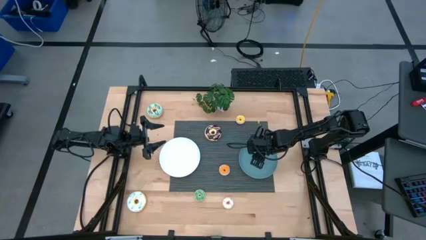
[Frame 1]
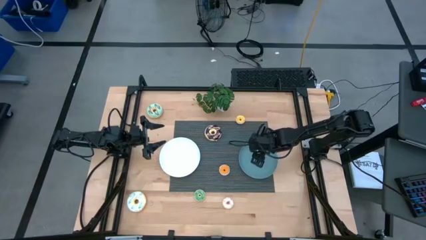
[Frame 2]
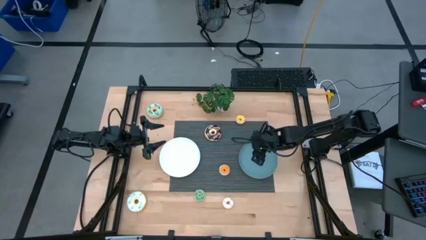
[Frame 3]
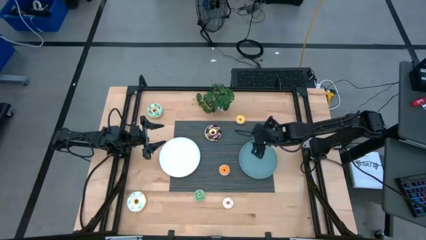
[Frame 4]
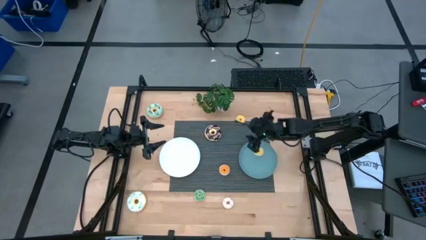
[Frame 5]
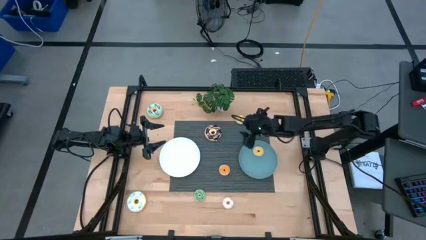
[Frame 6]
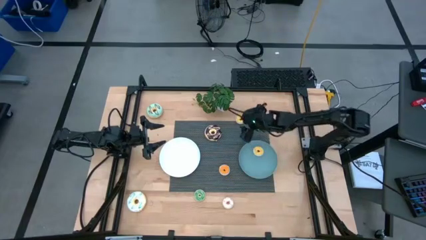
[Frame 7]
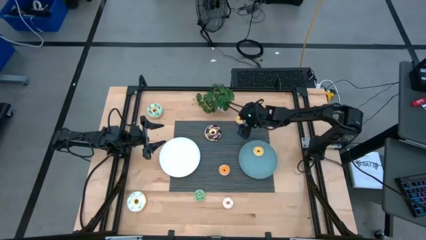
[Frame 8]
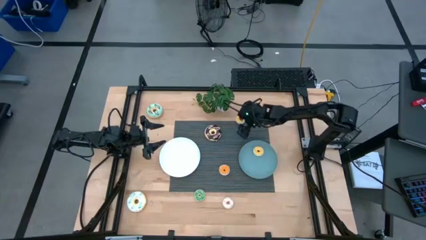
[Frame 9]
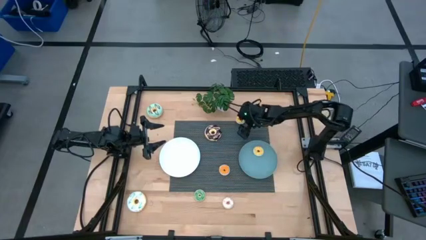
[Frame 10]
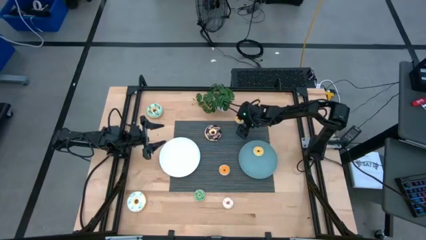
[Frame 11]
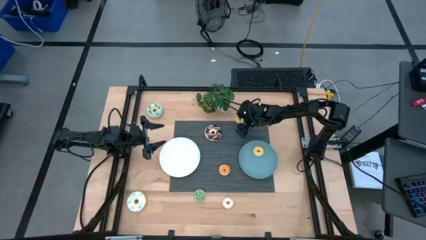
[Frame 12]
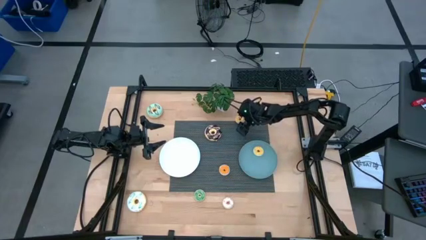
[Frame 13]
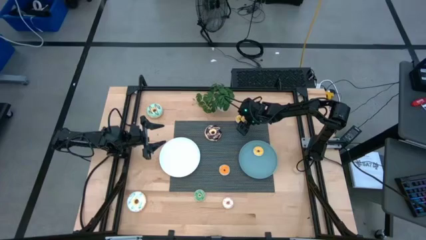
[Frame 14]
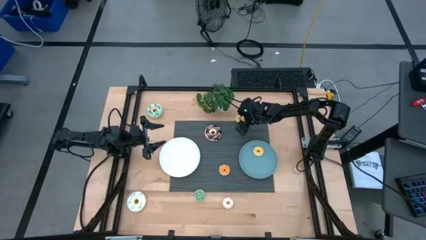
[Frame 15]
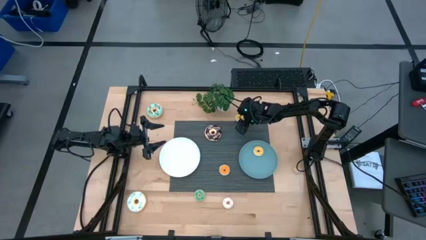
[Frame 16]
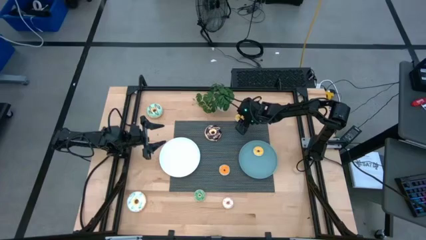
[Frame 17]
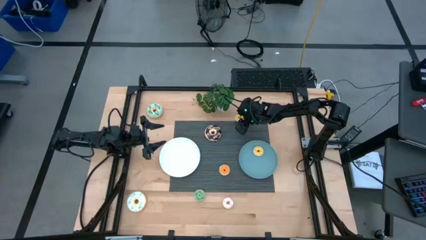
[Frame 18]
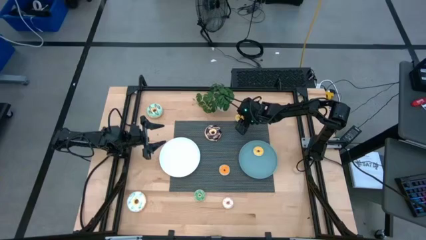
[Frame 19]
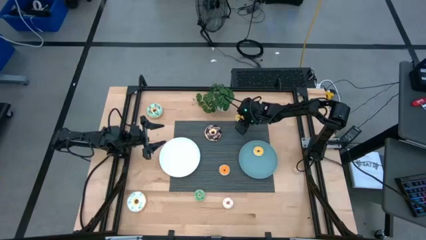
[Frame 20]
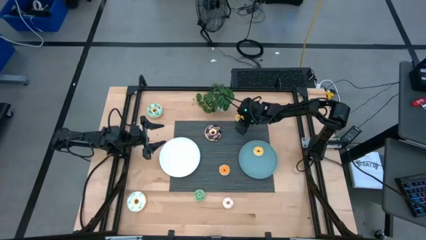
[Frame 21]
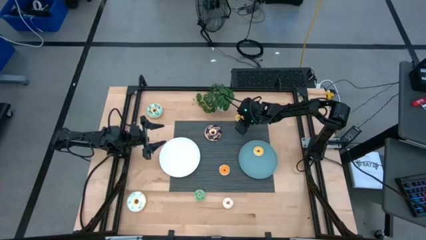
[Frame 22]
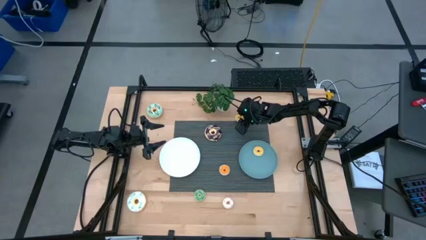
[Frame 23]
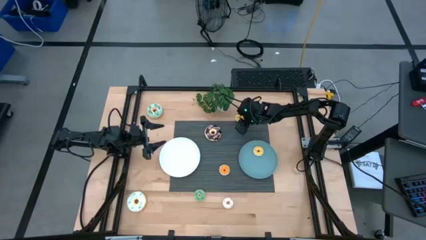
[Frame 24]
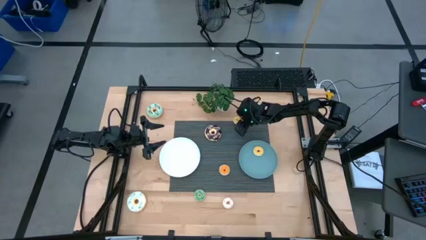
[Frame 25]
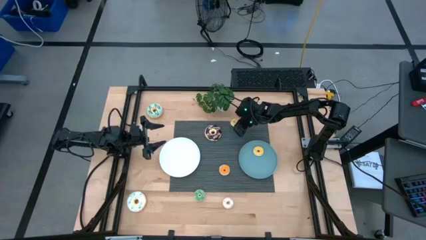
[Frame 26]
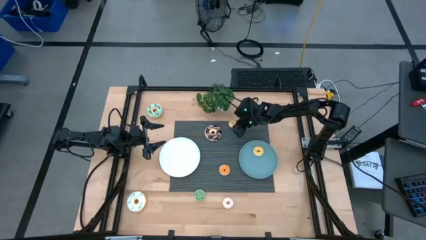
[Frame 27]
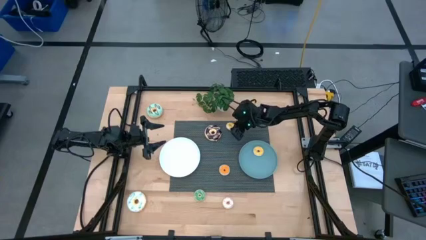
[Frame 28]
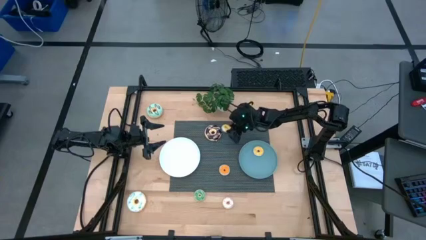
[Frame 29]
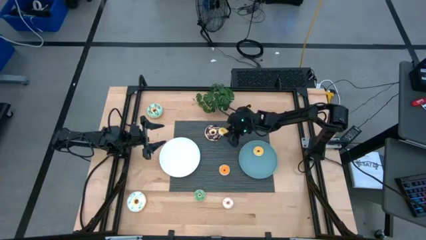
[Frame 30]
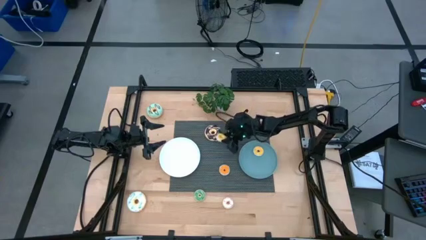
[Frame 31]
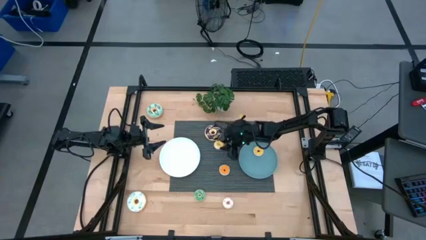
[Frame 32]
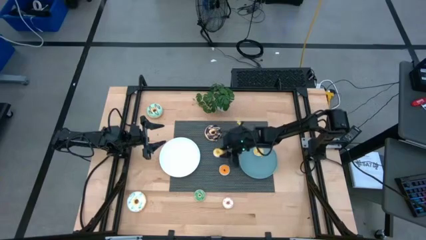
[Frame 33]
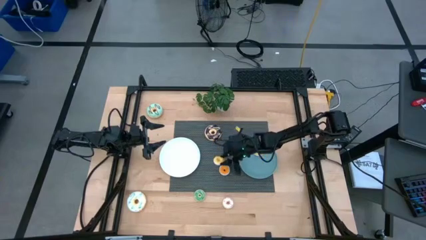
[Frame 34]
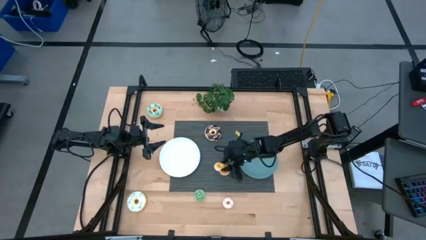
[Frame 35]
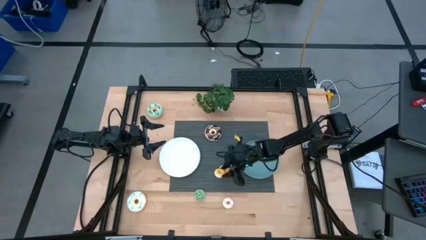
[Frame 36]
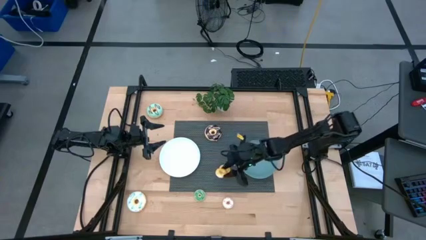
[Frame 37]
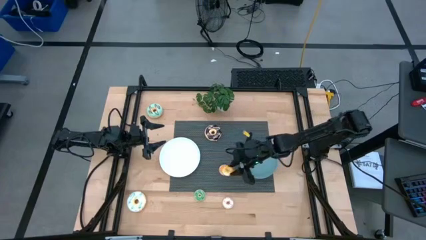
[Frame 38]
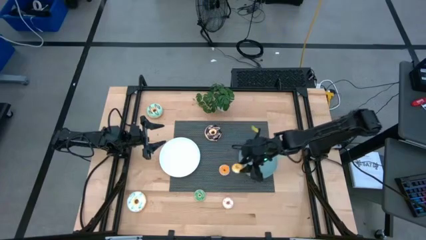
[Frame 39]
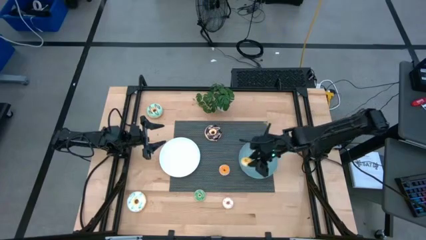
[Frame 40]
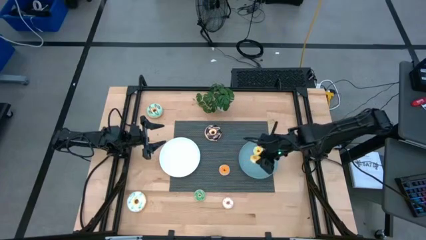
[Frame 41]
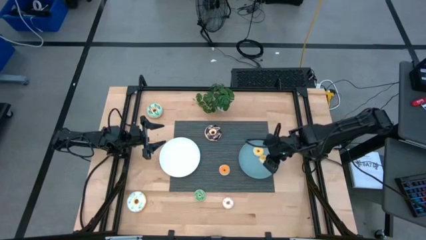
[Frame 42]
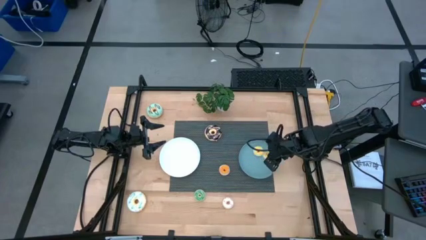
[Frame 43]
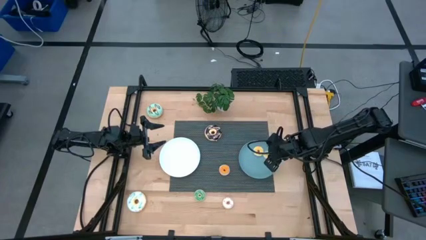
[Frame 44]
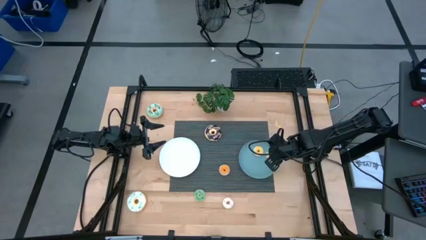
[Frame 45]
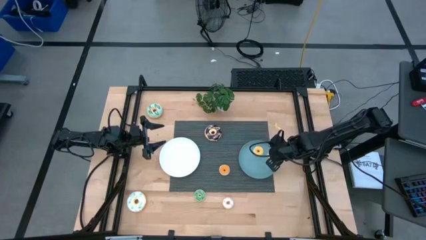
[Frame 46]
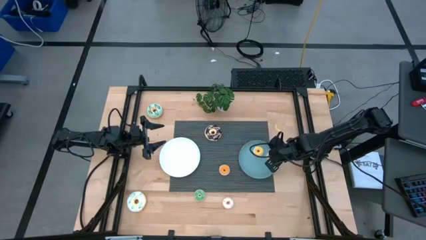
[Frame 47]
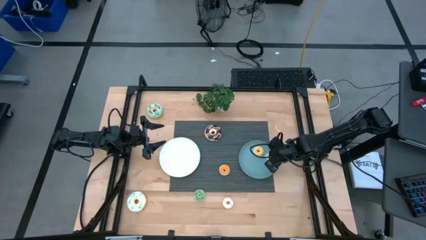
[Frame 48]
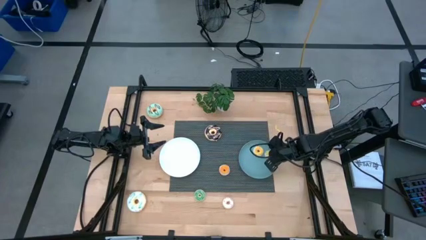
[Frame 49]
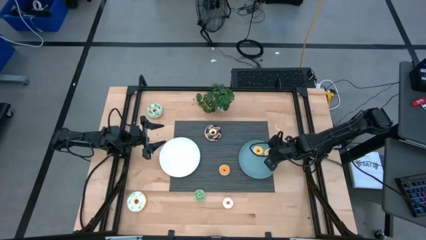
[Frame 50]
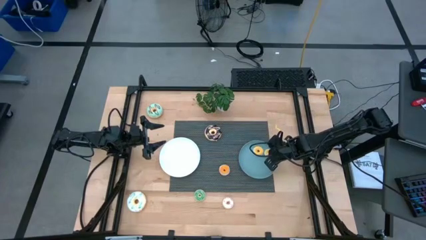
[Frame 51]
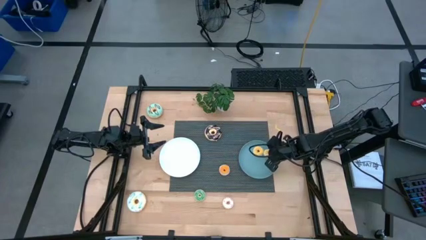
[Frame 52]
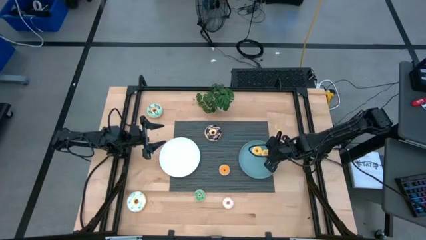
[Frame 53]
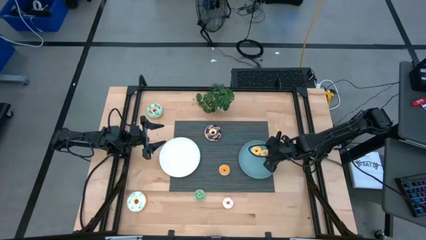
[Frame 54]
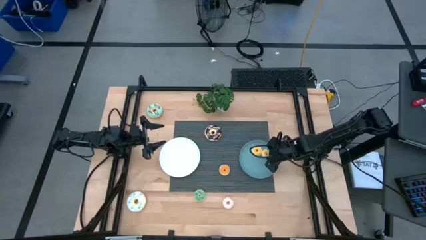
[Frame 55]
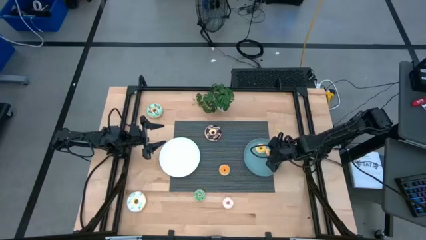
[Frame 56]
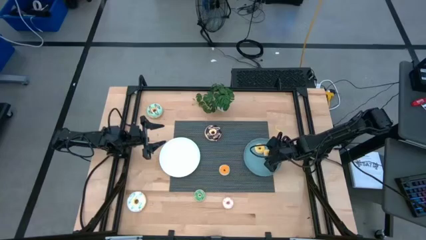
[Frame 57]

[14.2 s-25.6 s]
Task: Pick & Place donuts
Put the small yellow doughnut on top of the blue plate
